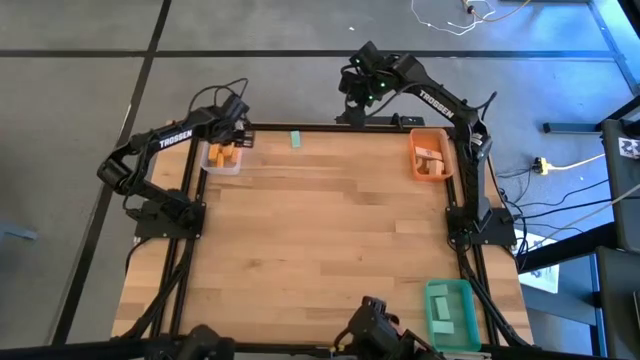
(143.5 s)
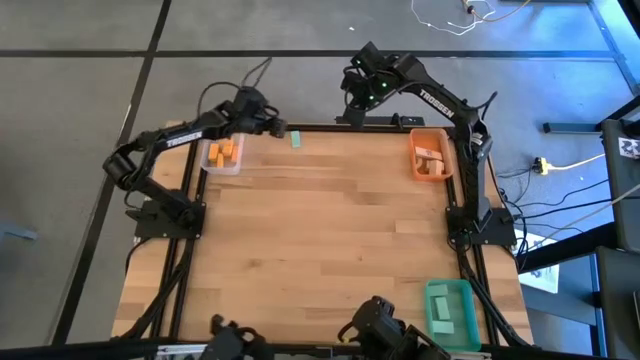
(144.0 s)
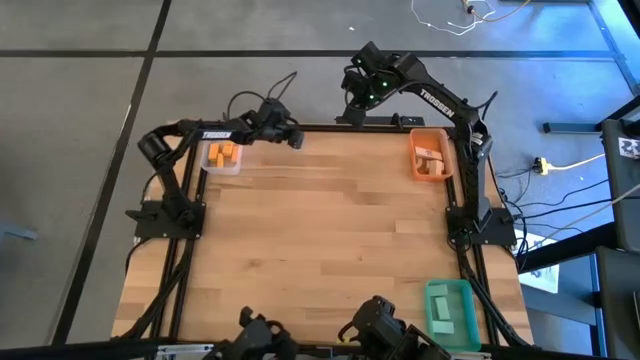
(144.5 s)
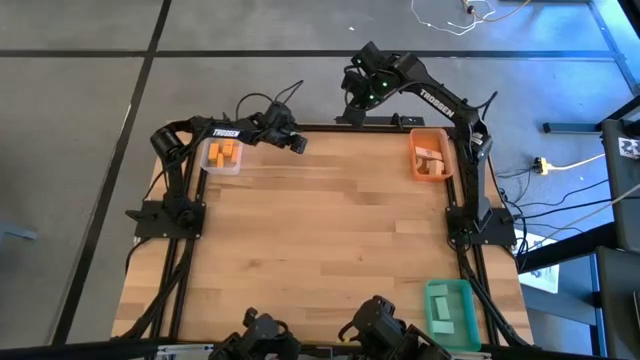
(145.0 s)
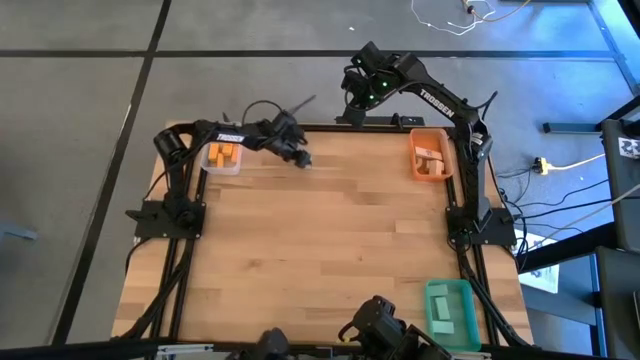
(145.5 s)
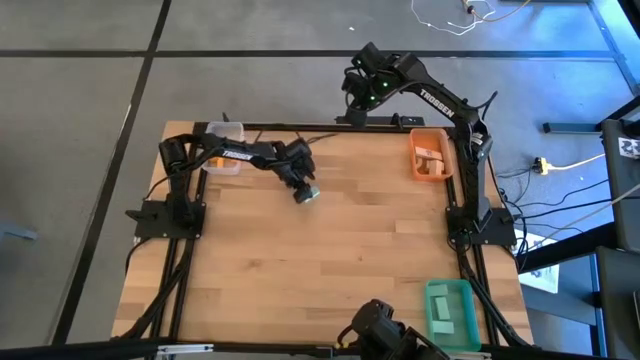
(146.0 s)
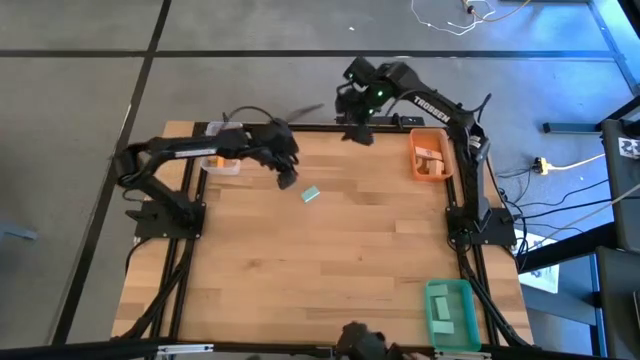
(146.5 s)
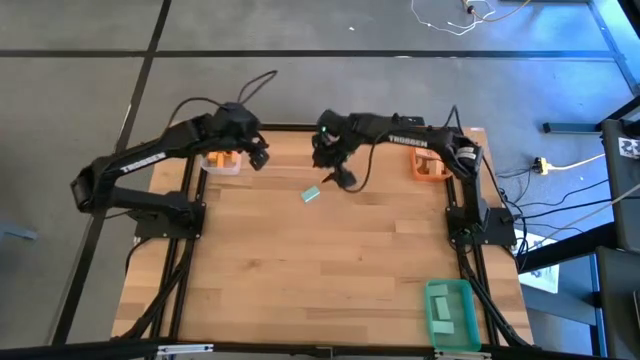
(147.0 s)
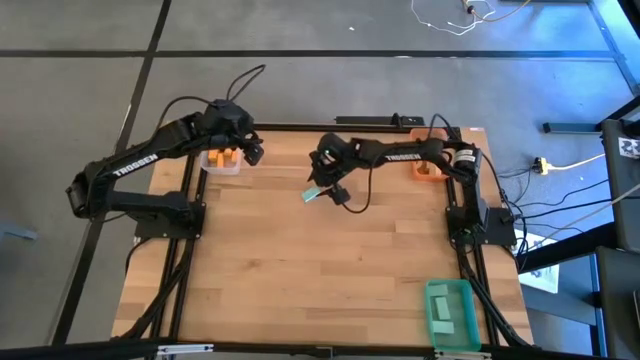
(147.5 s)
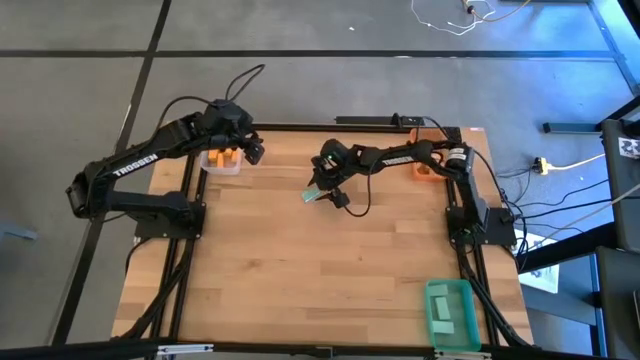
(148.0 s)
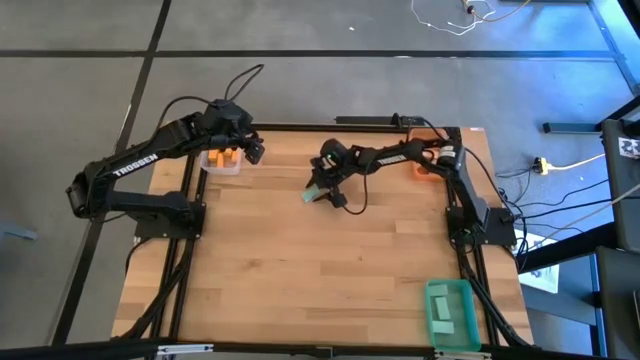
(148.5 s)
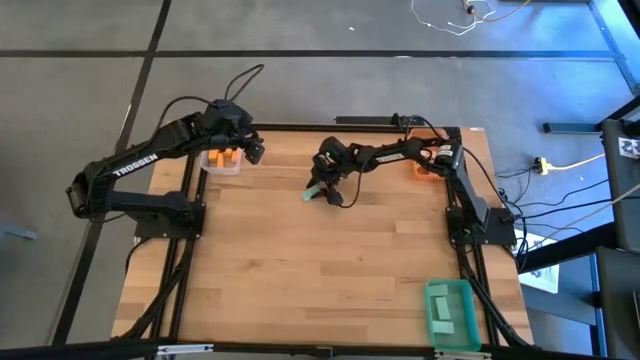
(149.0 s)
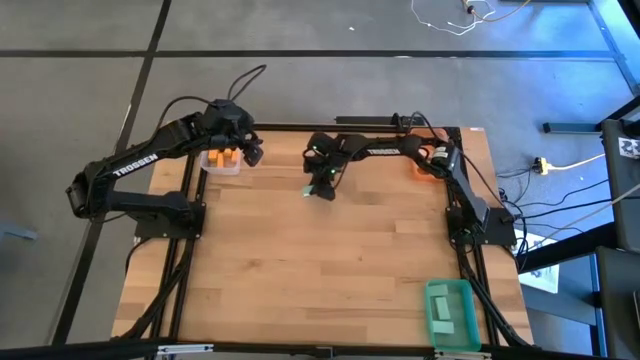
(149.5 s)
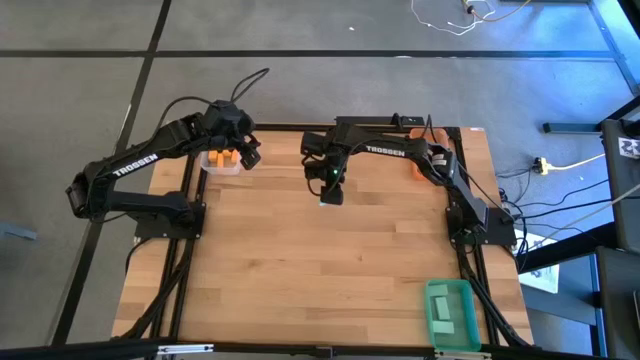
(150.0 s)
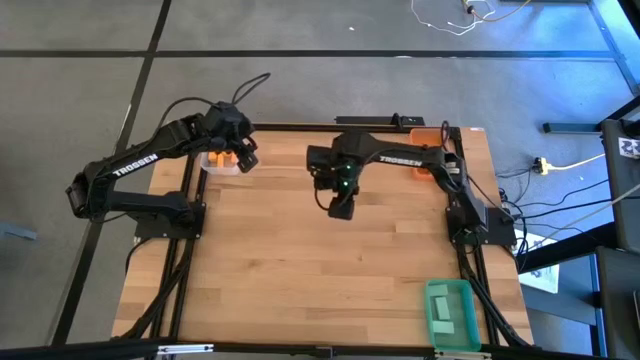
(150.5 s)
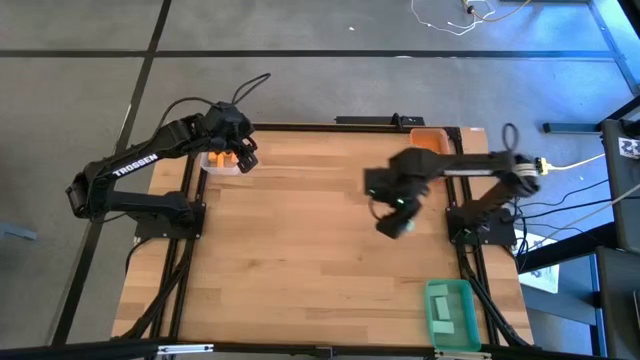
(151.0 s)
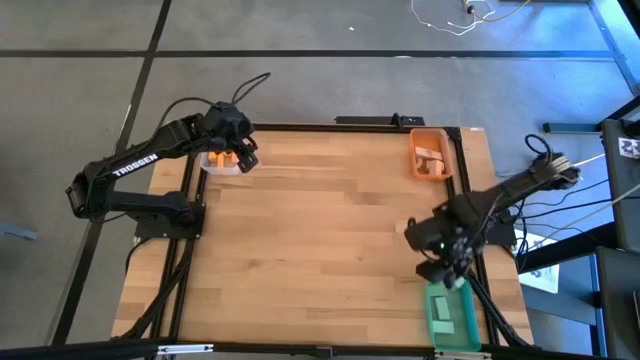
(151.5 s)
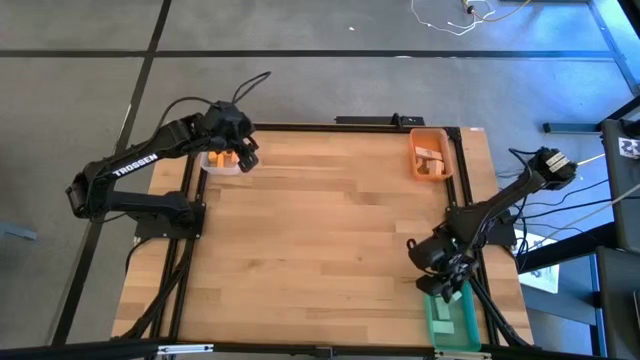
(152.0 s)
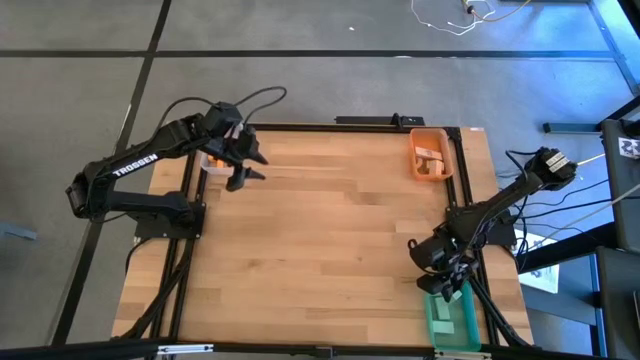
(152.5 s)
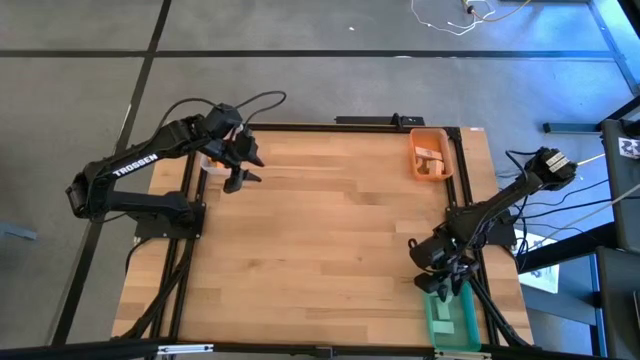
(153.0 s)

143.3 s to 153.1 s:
Task: Sort & place blocks by color
Put the blue block into the green bin

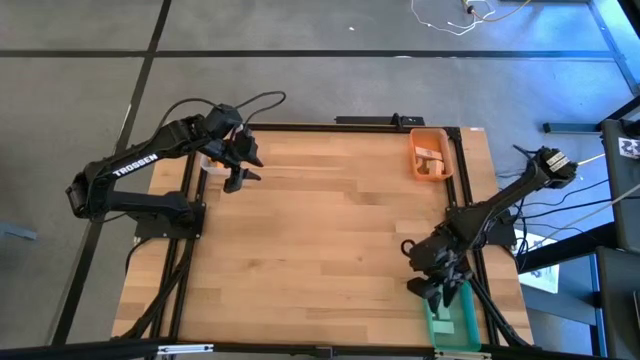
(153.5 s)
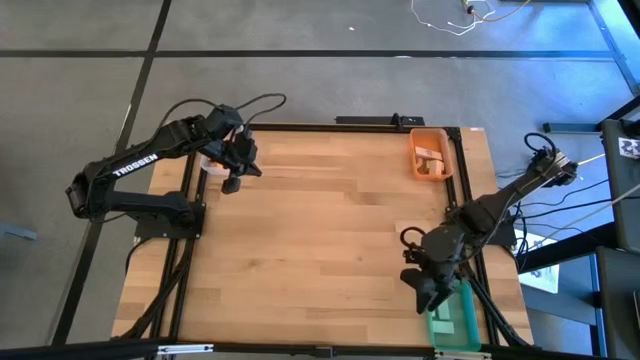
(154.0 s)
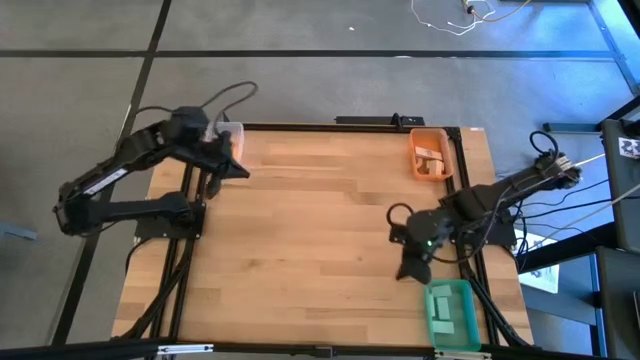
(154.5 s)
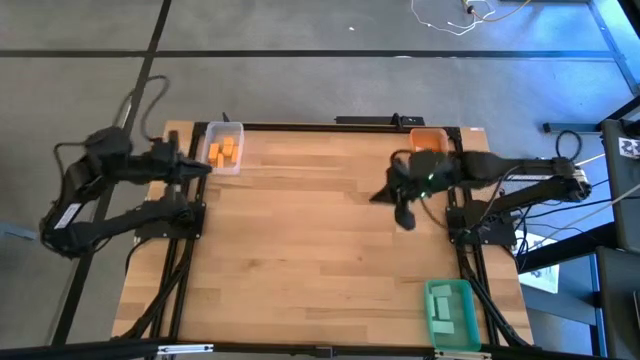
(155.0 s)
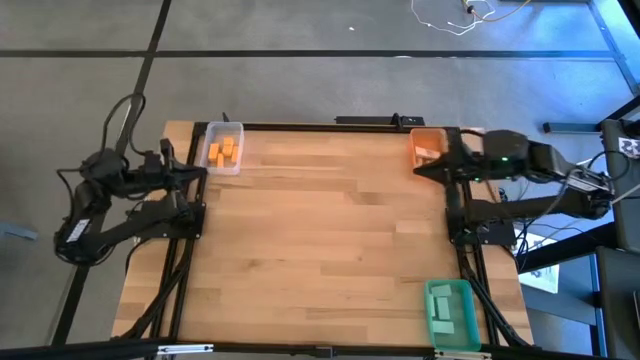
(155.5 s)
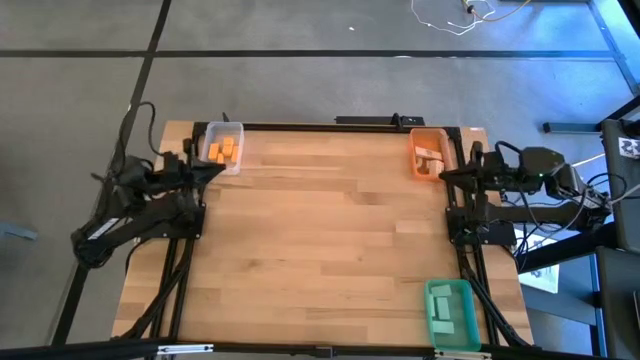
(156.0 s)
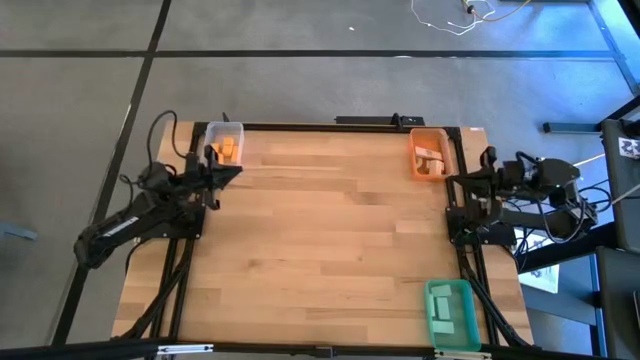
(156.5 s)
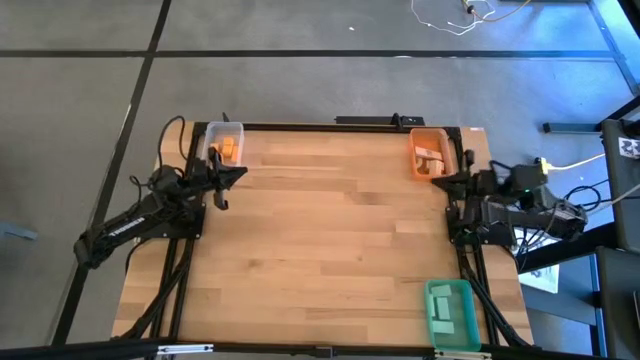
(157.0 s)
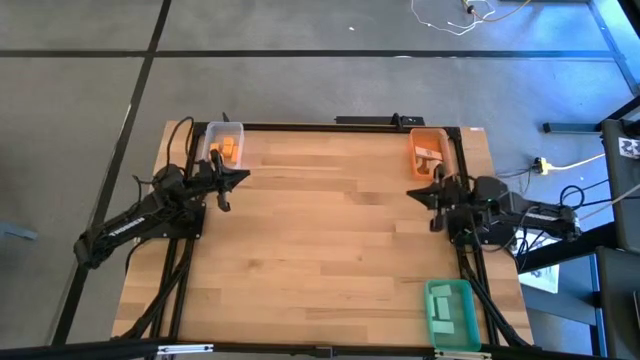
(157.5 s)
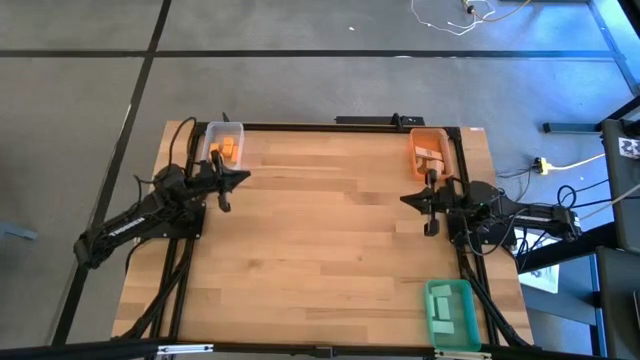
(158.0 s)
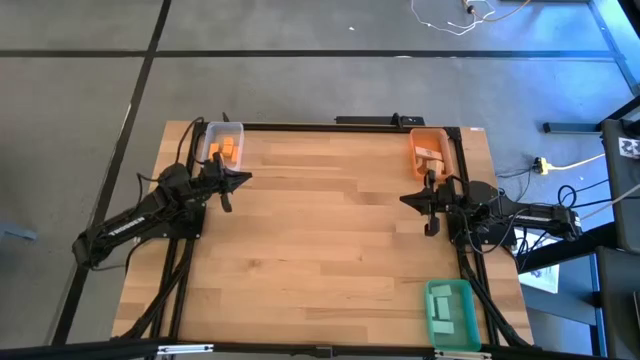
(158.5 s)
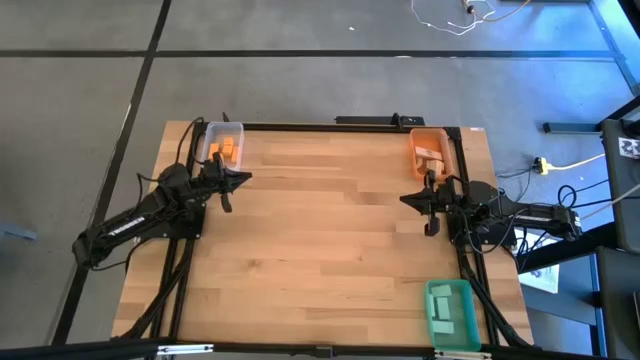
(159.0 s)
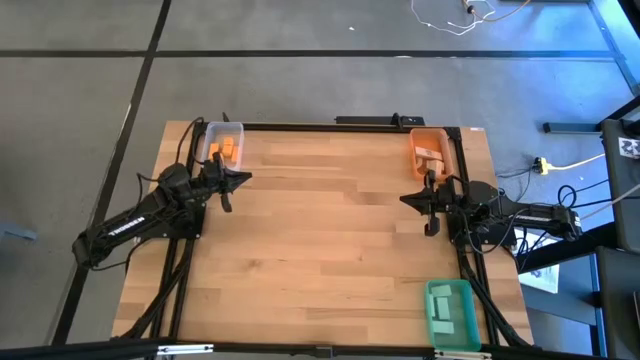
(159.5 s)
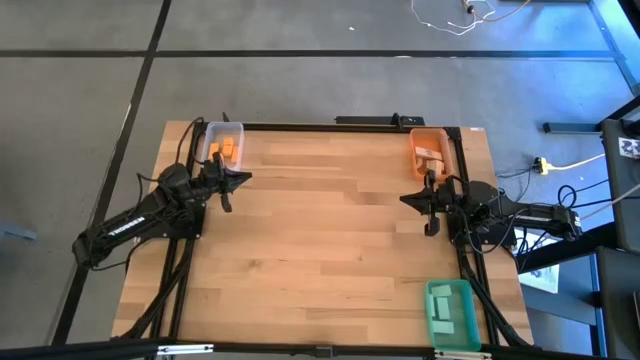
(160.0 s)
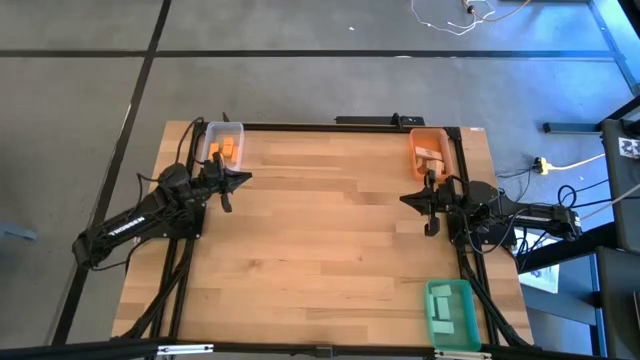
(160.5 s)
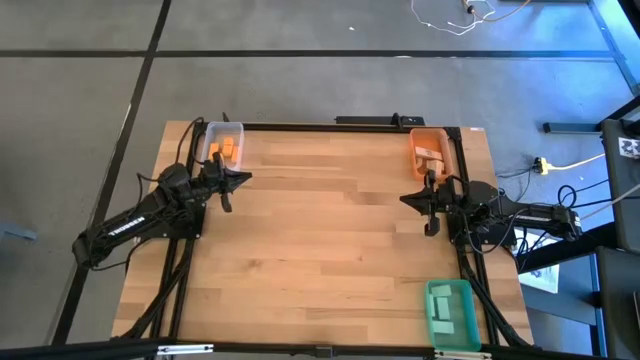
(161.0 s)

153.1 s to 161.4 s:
Return to Home Position

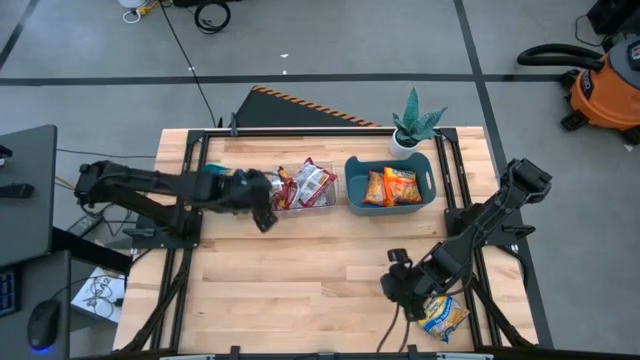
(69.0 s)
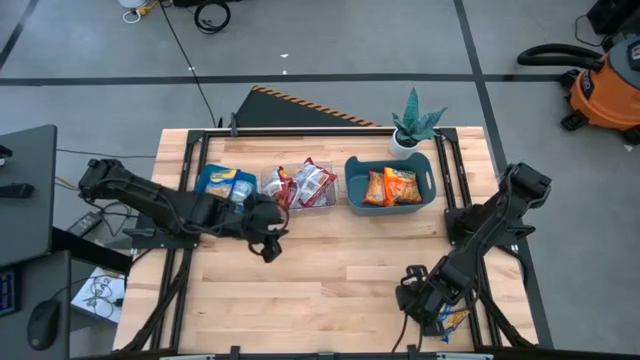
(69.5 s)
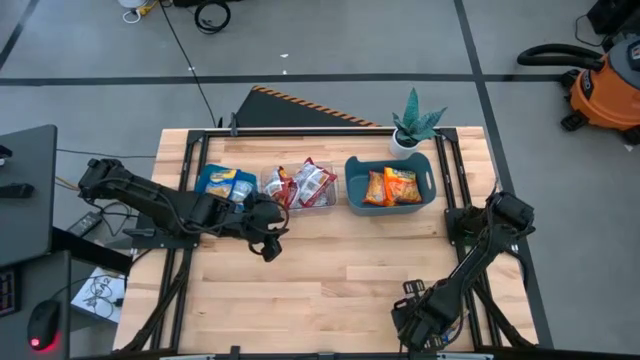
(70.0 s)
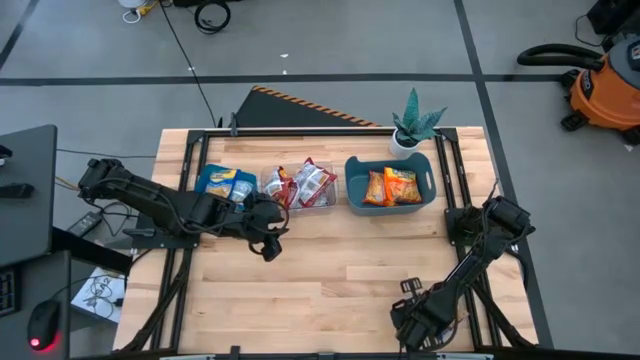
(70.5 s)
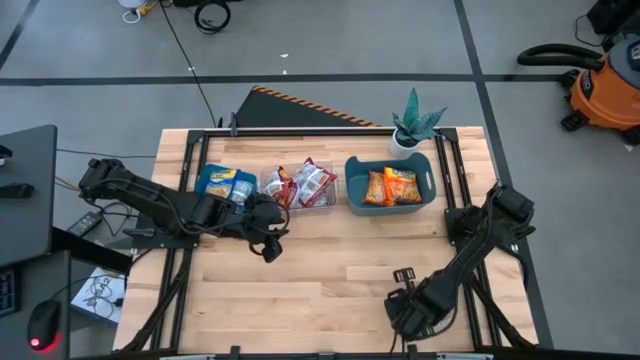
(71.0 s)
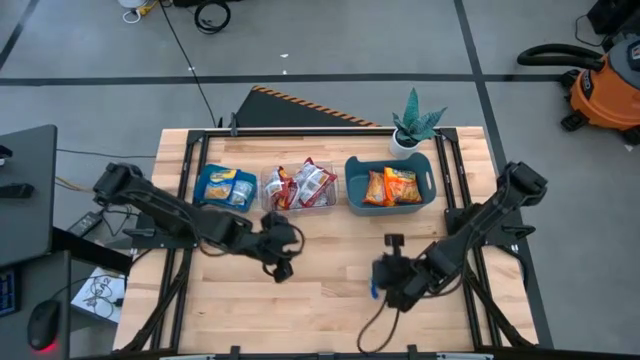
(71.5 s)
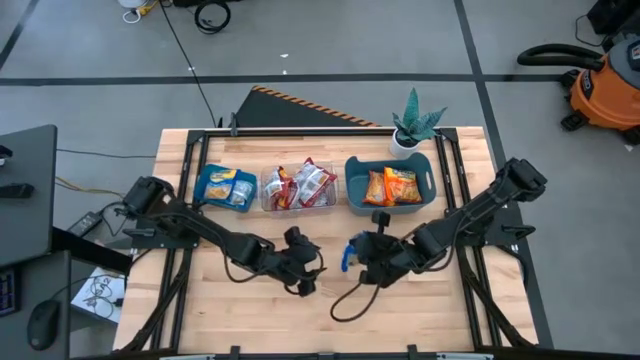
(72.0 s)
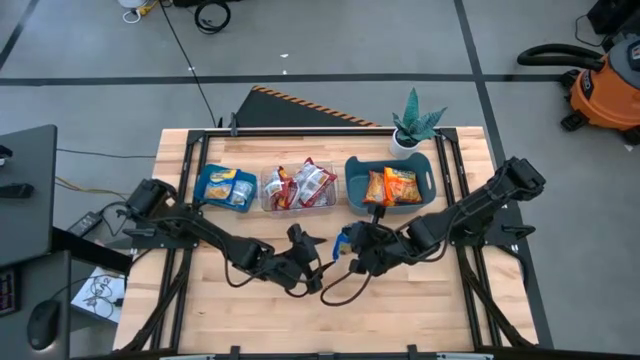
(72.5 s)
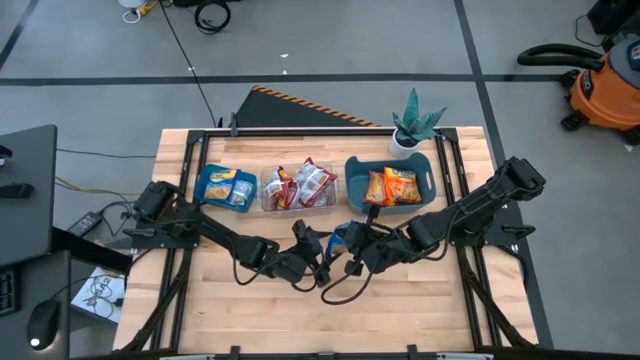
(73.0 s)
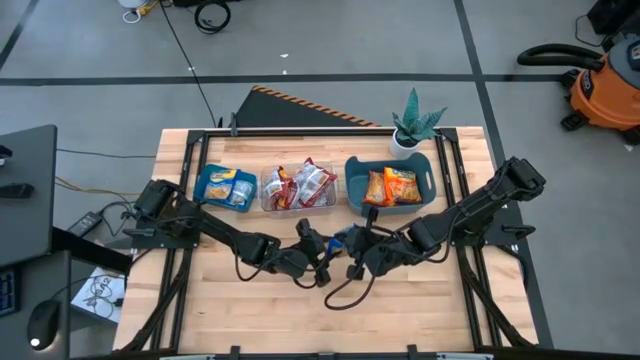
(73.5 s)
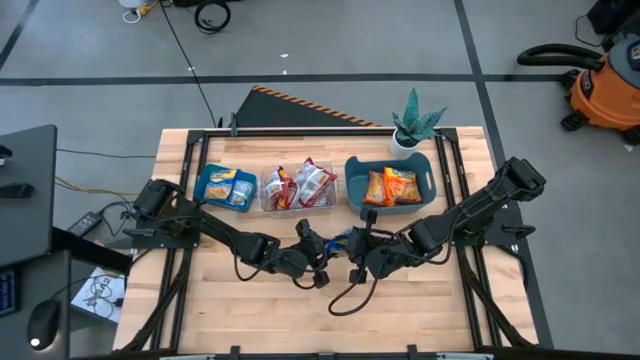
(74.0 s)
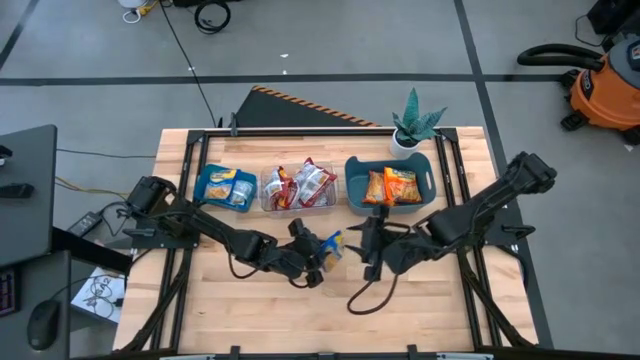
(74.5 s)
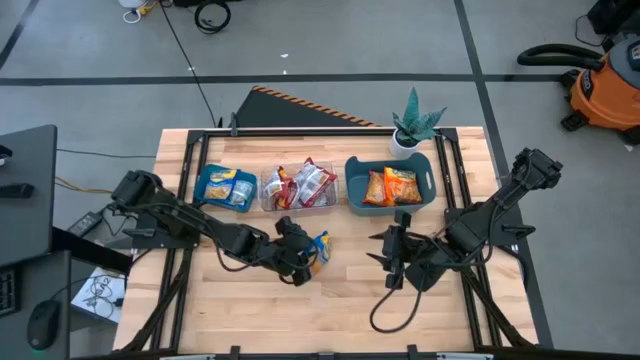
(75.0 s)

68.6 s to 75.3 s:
Task: Sort Maruchan noodles
Put the blue noodle pack into the blue bin
